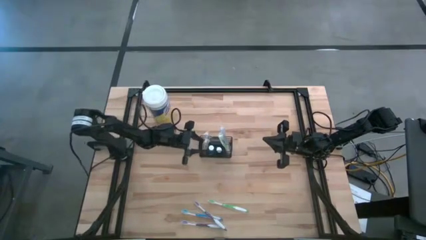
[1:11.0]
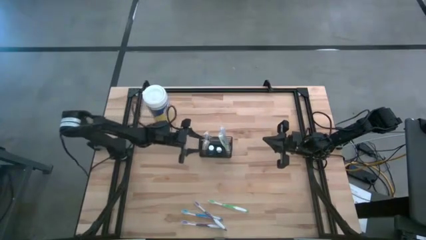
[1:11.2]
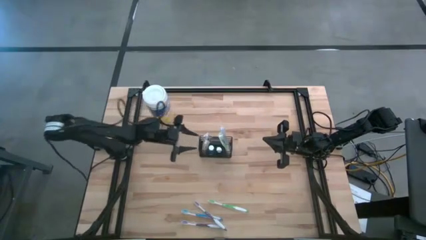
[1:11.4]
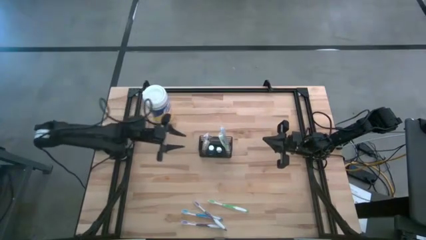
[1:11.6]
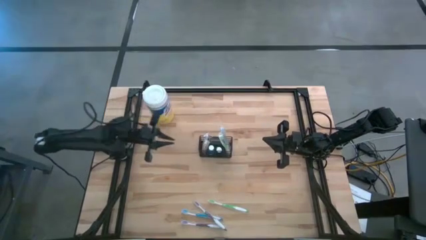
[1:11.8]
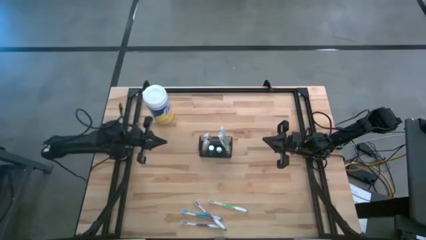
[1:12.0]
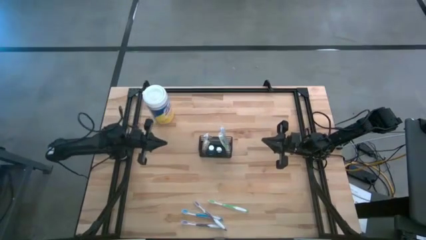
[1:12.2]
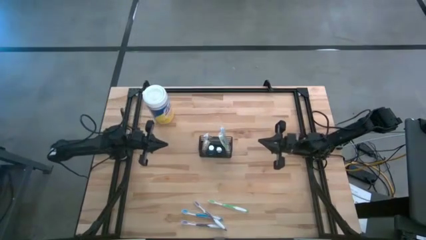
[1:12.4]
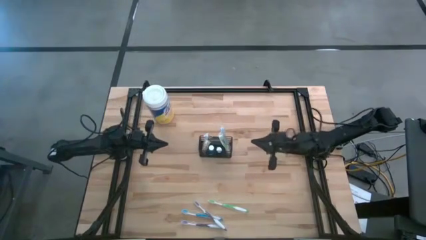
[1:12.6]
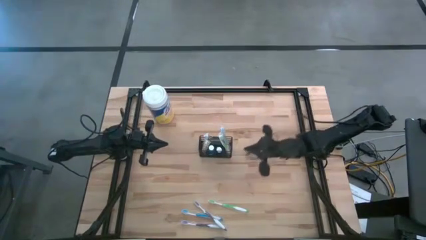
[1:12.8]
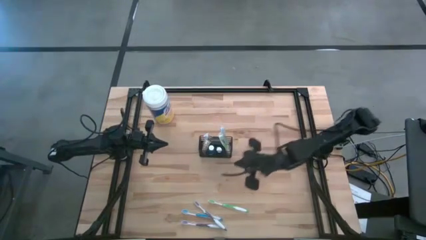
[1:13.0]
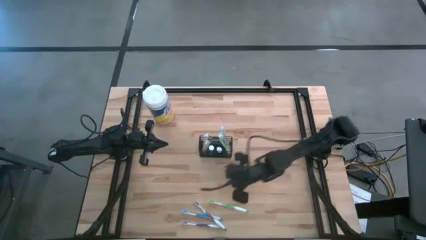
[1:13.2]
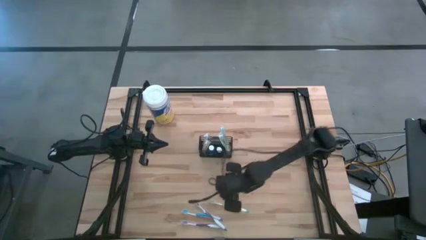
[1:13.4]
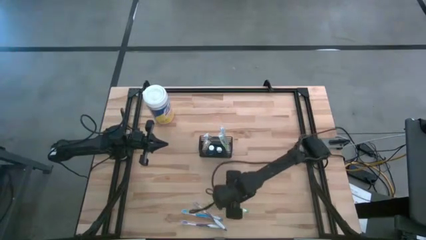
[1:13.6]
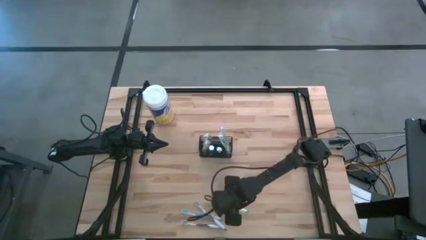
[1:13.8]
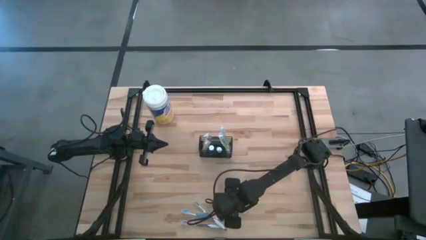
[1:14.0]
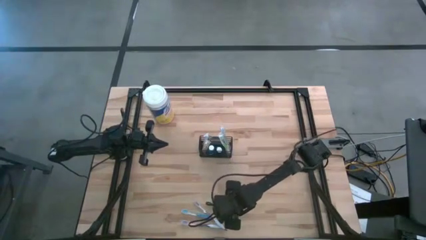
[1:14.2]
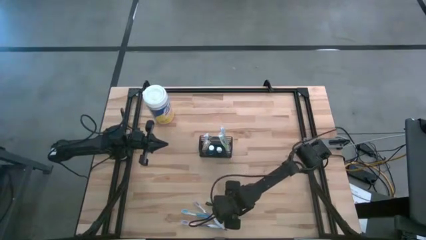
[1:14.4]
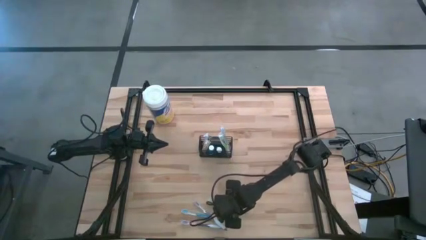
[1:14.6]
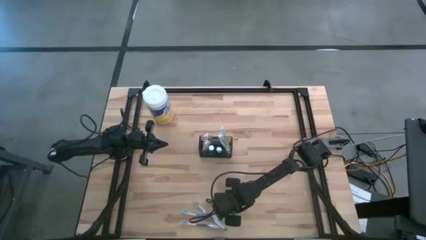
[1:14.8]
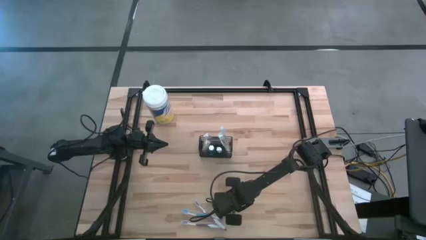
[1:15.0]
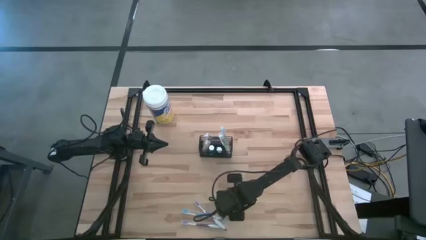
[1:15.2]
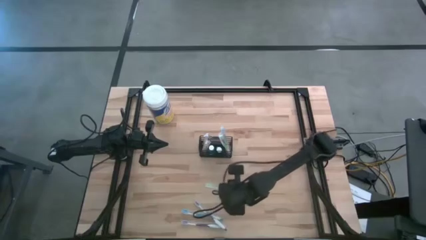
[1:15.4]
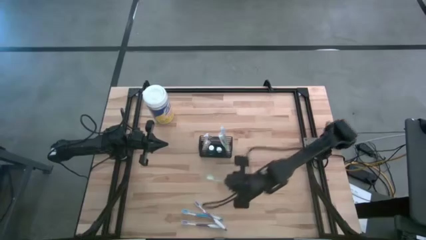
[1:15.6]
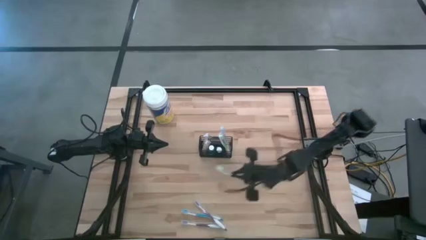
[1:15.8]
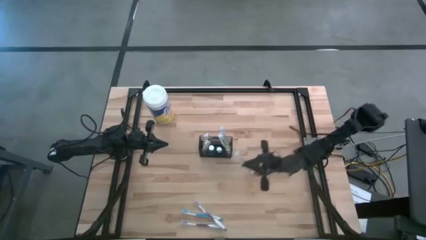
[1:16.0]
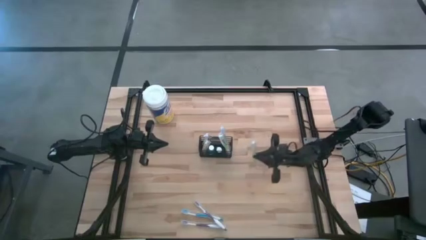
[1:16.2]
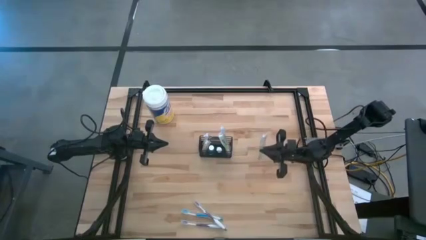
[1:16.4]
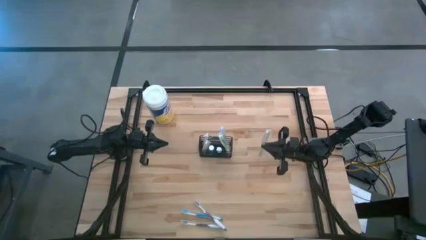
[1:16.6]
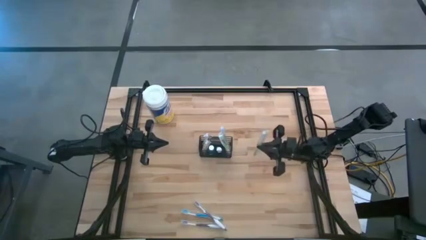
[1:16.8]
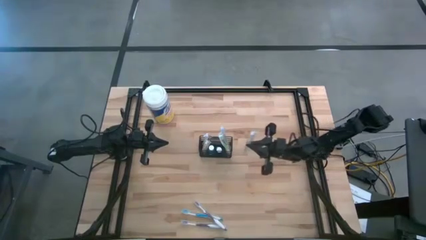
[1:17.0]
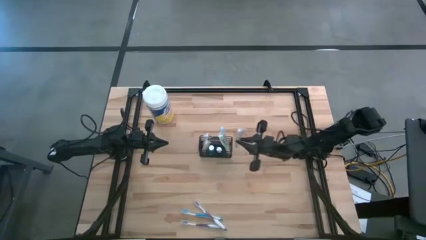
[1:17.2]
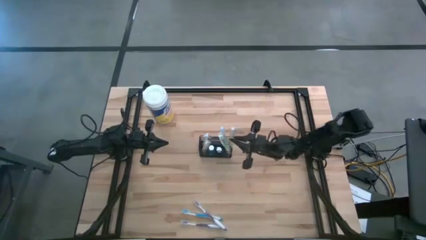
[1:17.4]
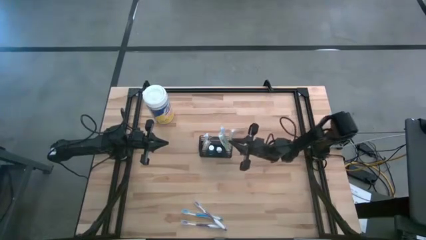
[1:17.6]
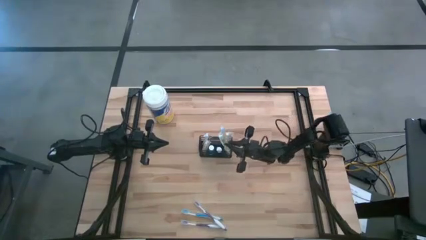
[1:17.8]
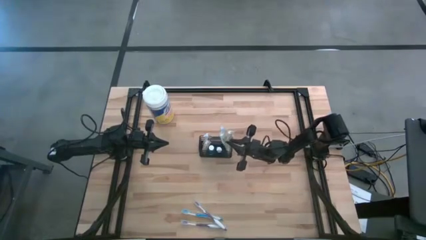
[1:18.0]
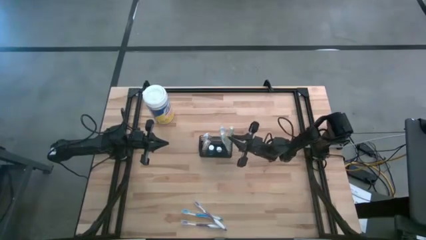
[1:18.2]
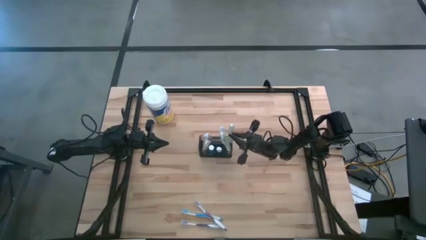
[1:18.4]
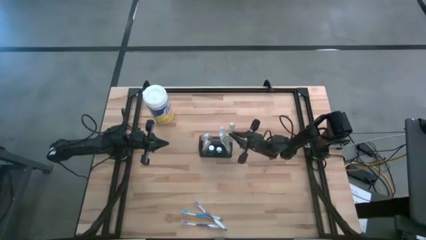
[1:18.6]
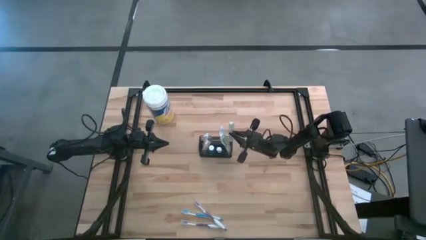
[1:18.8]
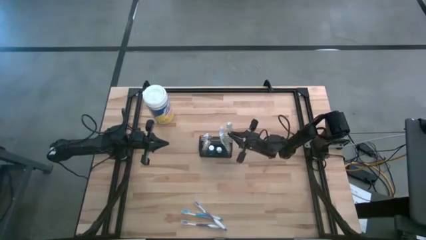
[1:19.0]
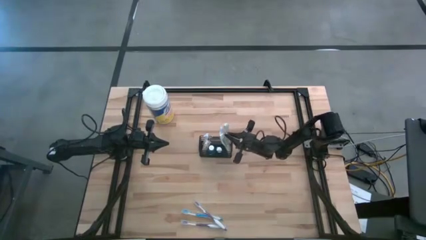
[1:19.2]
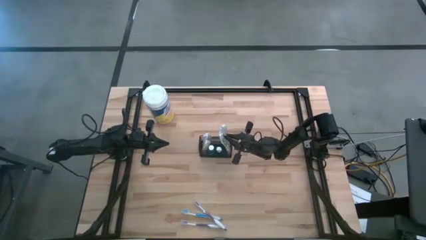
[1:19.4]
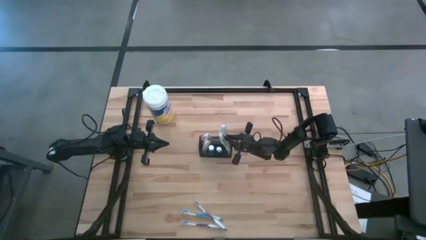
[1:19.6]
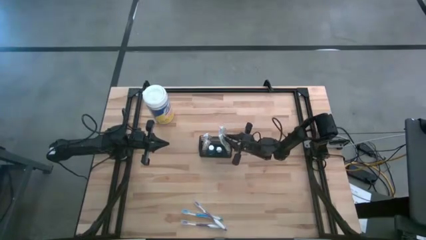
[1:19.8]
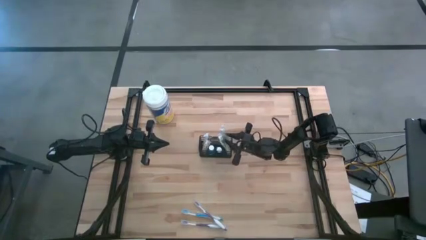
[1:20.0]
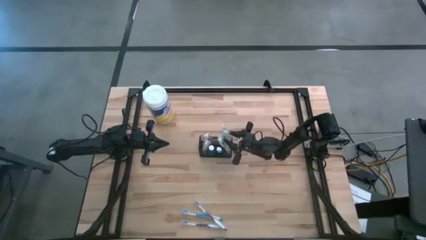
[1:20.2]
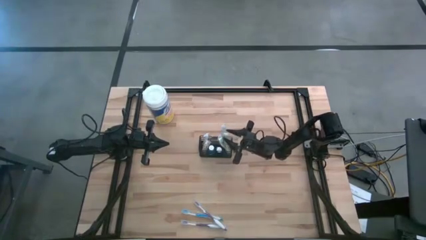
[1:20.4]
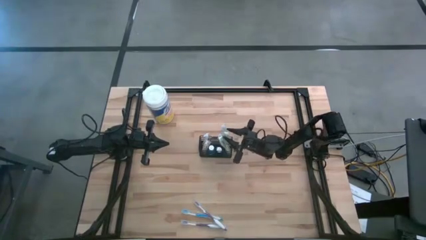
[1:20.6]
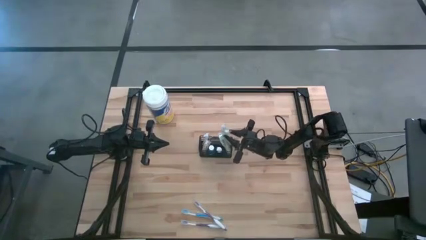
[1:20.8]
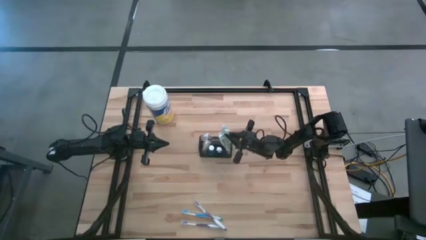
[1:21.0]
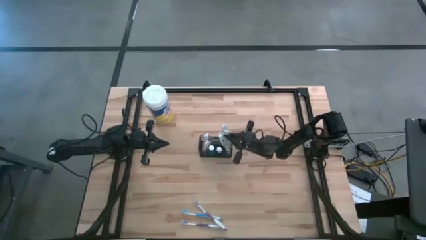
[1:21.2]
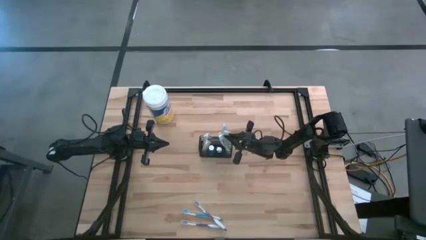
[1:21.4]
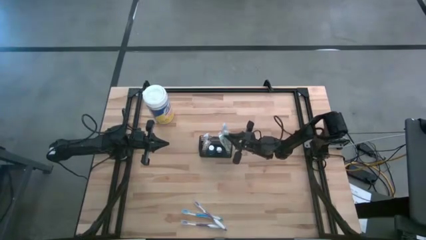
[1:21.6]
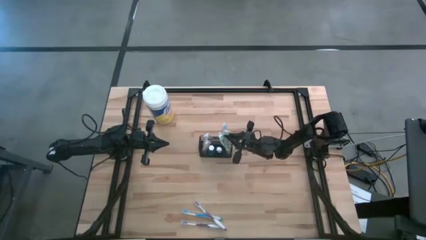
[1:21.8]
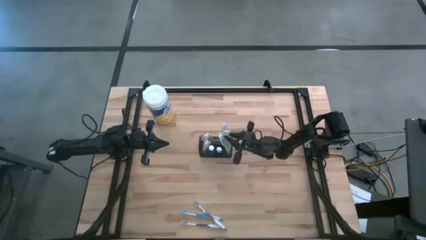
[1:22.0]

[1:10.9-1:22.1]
Task: Pick & Place toothbrushing station
Put the green toothbrush into the wire organizer

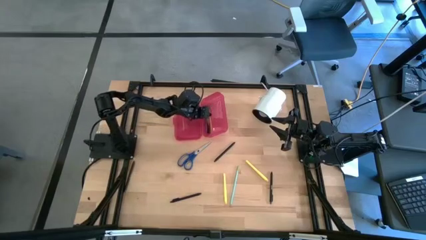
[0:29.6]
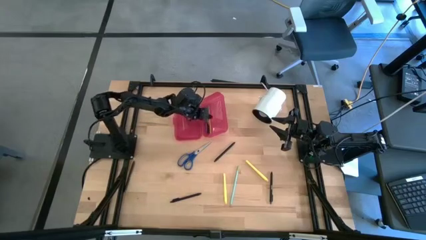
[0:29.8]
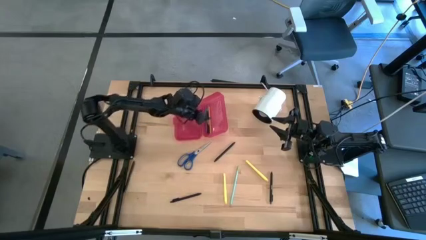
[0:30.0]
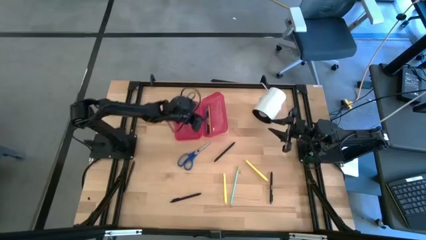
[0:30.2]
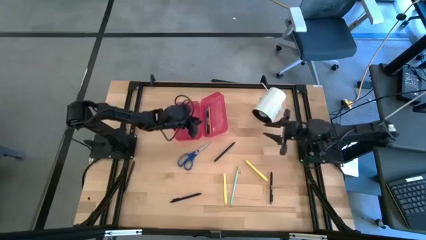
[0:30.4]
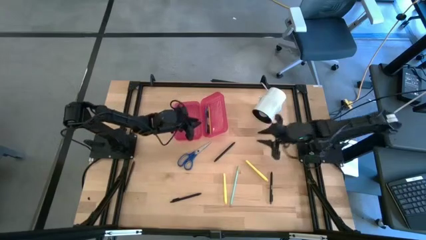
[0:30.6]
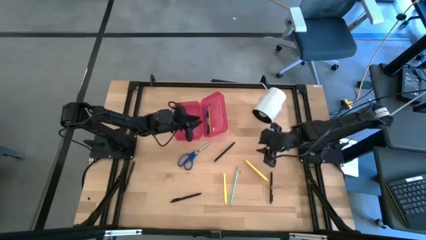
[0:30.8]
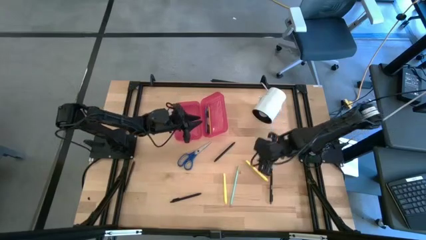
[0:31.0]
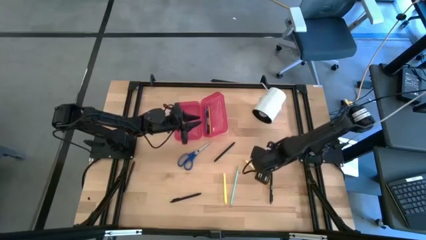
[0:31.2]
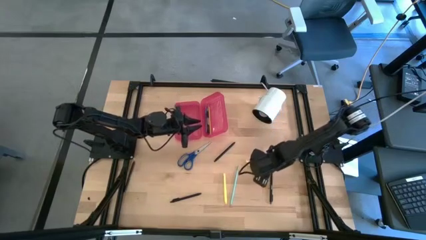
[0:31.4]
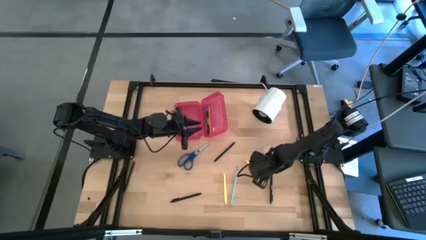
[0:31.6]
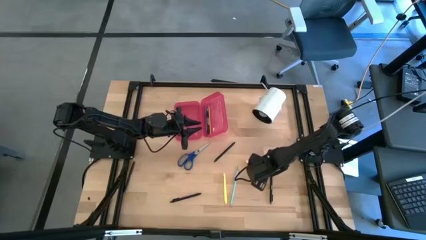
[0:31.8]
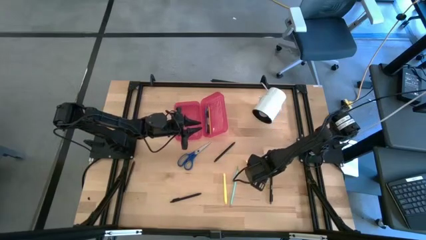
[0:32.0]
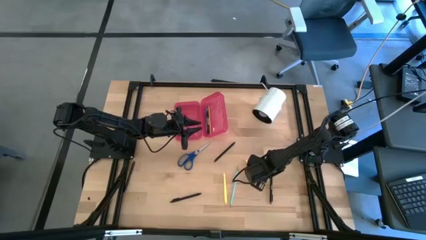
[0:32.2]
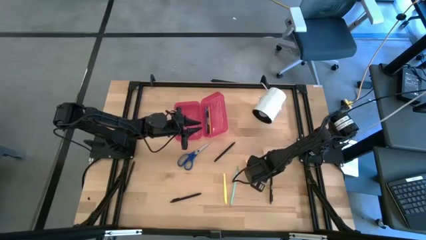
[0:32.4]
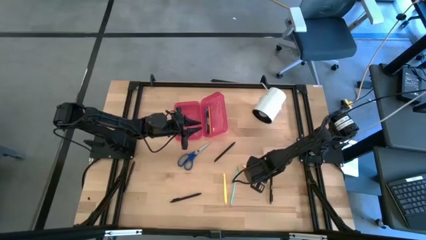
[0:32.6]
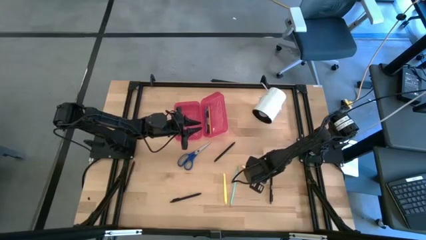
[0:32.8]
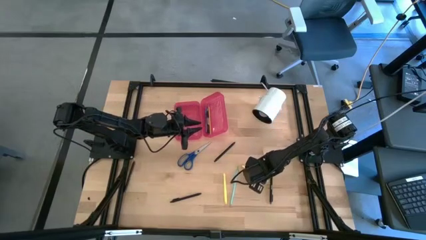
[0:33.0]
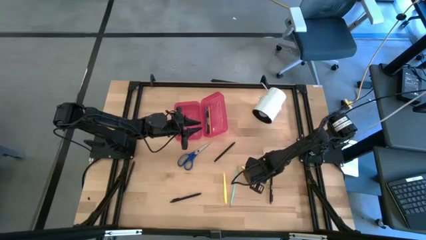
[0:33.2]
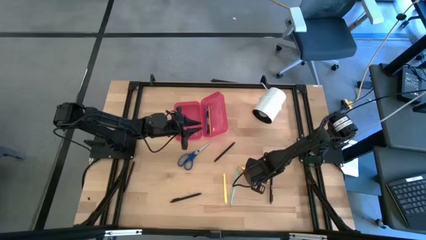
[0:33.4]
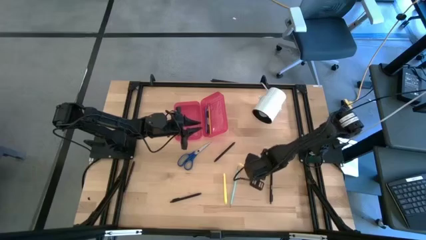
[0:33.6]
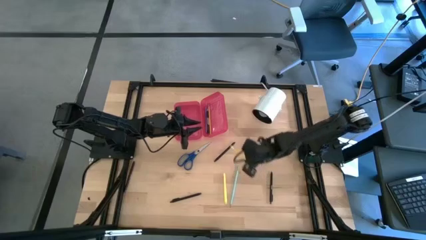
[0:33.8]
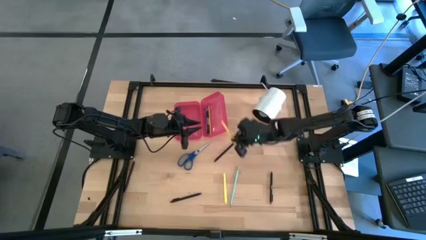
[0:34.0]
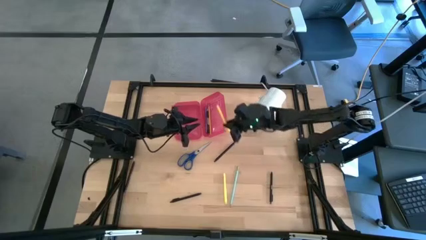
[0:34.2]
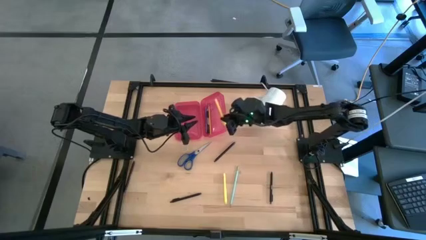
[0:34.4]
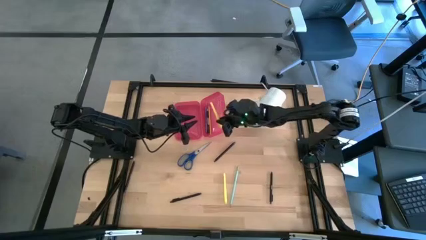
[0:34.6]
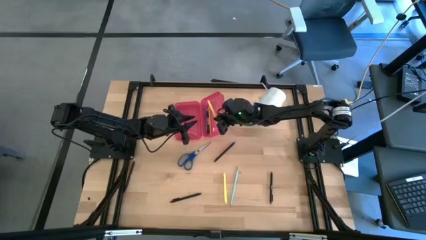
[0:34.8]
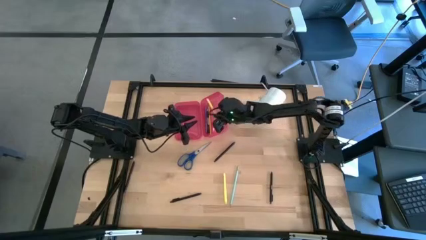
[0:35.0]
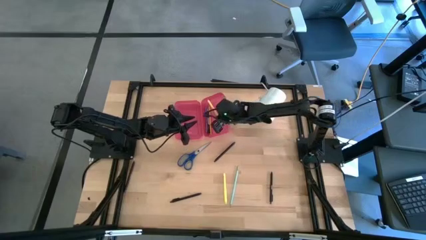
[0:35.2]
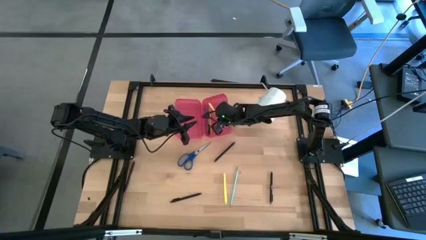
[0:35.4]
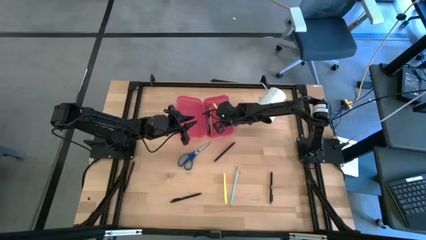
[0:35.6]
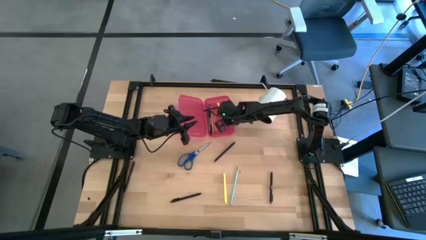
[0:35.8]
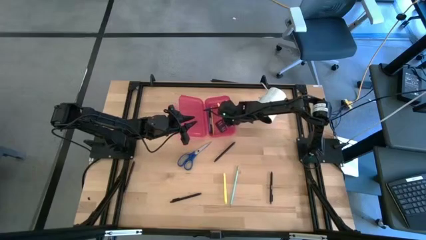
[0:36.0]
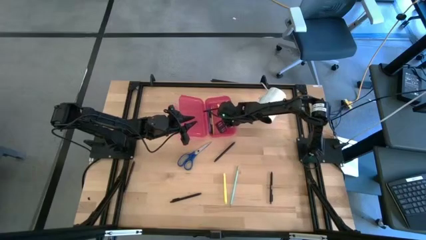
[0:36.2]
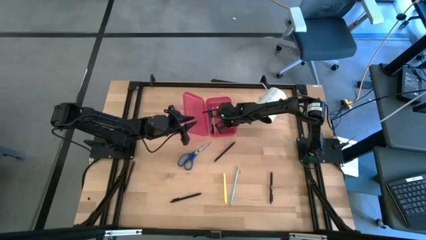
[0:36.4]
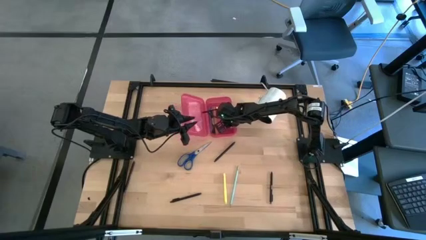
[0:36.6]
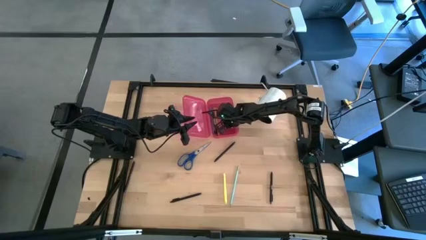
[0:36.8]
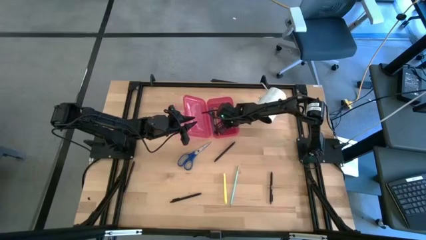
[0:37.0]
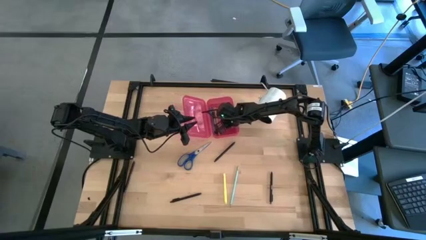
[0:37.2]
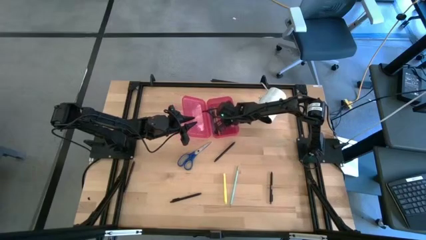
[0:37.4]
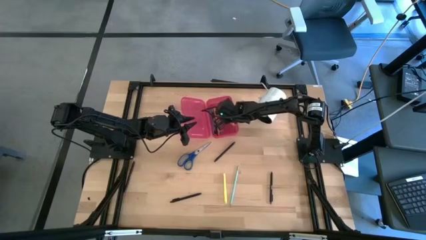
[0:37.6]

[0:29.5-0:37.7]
Task: Pick & place school supplies into a supply box
Put the yellow pen into the red supply box
